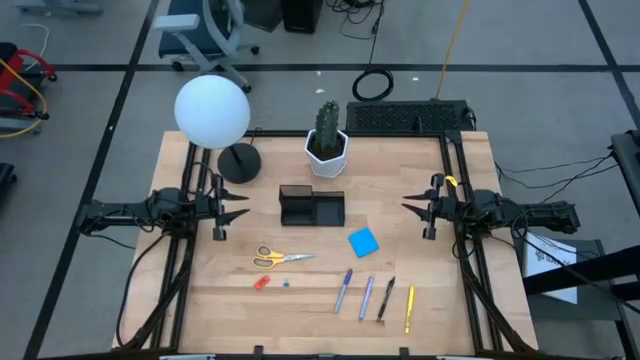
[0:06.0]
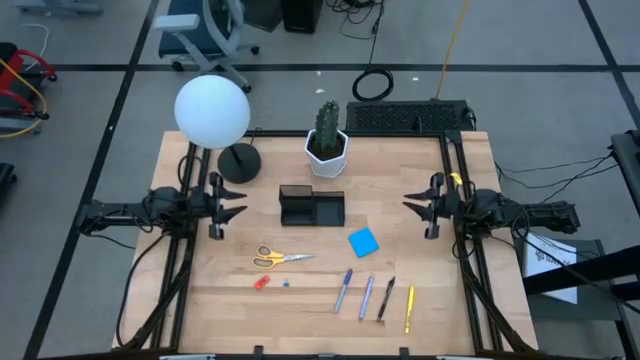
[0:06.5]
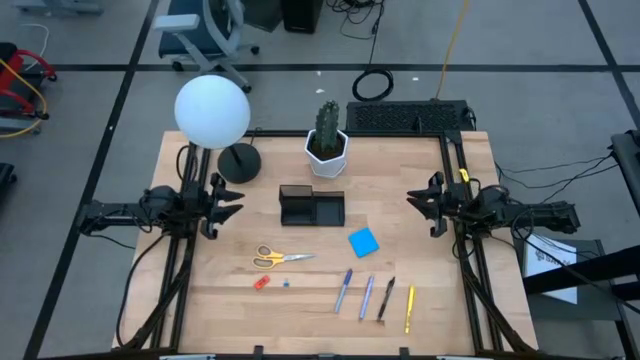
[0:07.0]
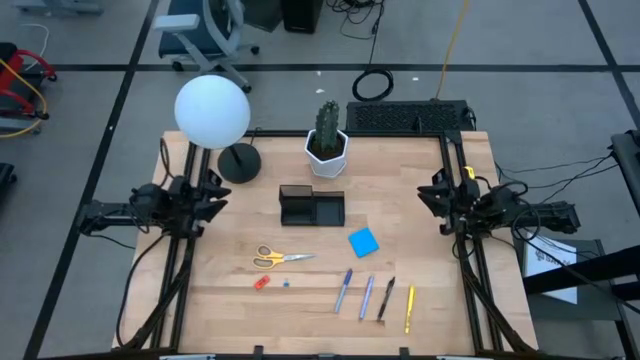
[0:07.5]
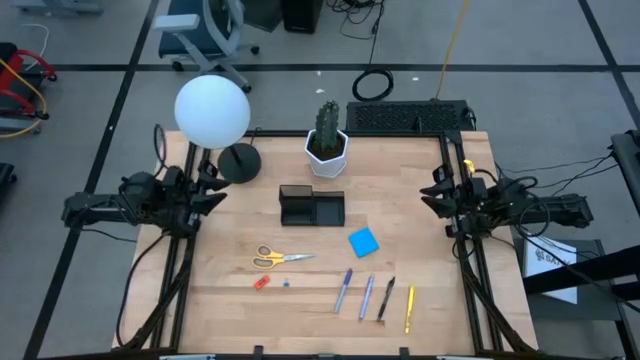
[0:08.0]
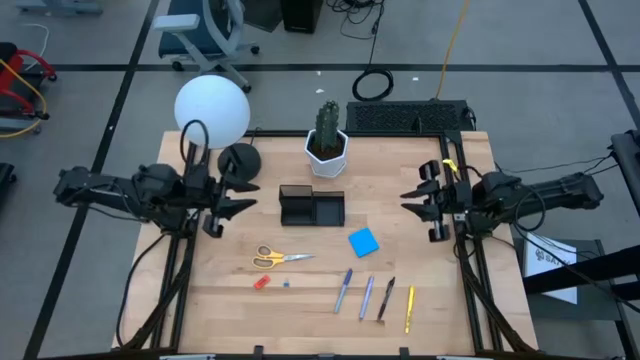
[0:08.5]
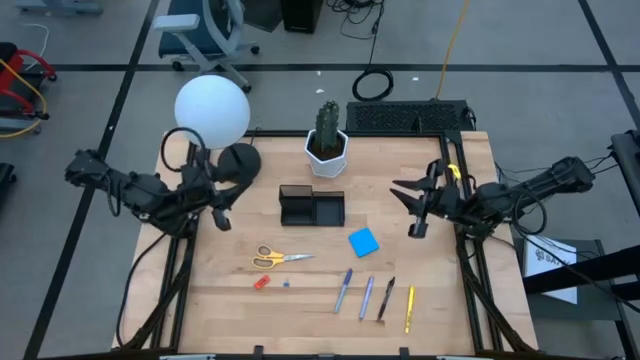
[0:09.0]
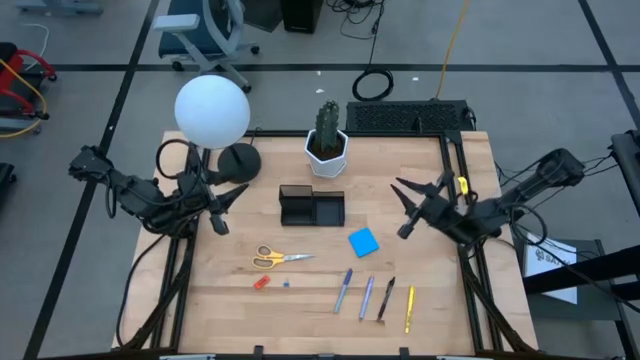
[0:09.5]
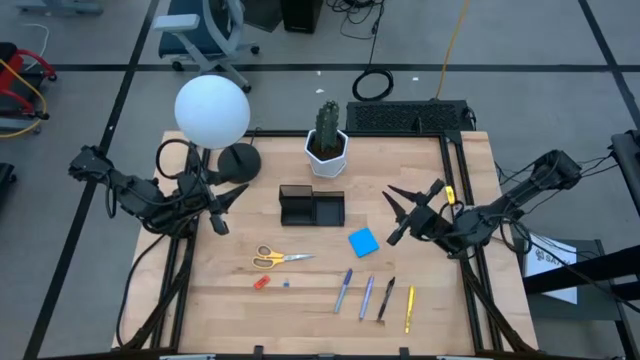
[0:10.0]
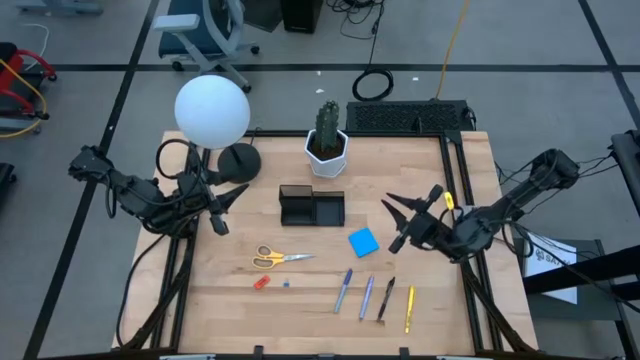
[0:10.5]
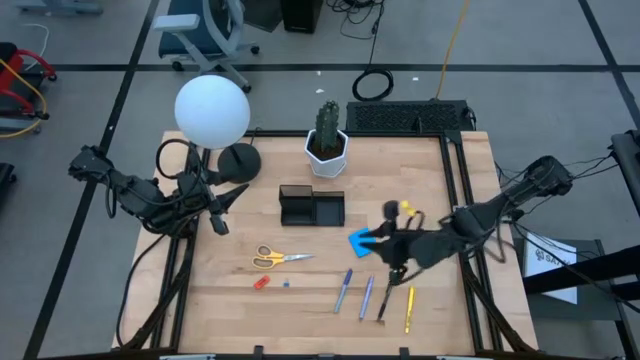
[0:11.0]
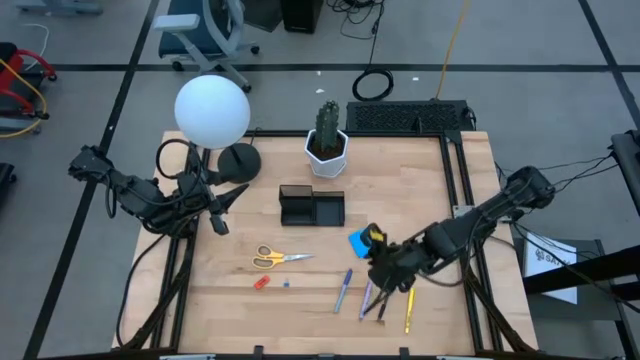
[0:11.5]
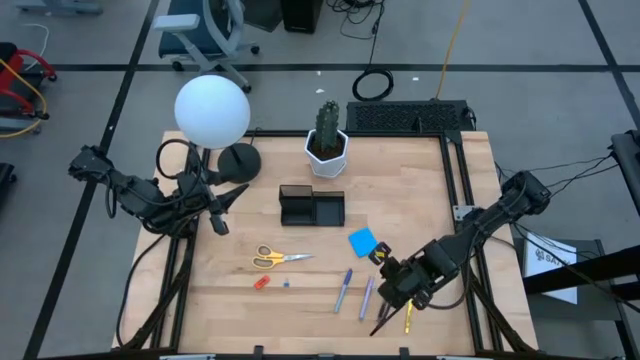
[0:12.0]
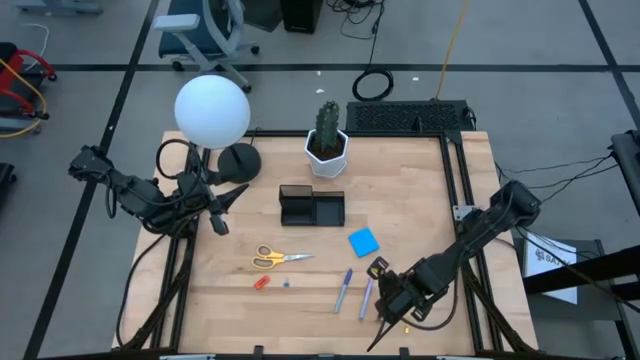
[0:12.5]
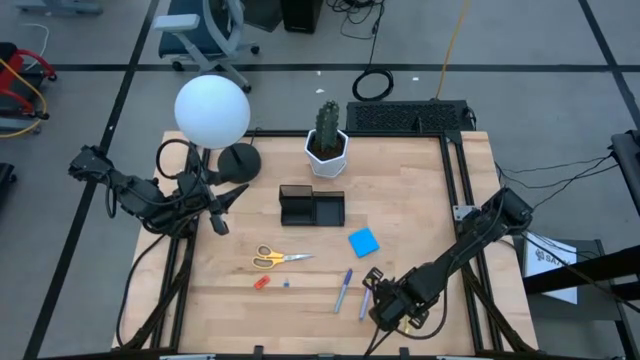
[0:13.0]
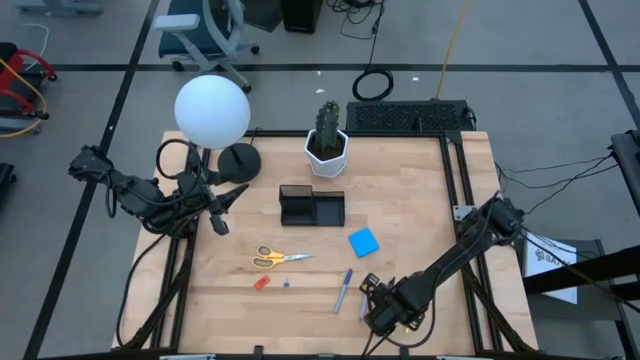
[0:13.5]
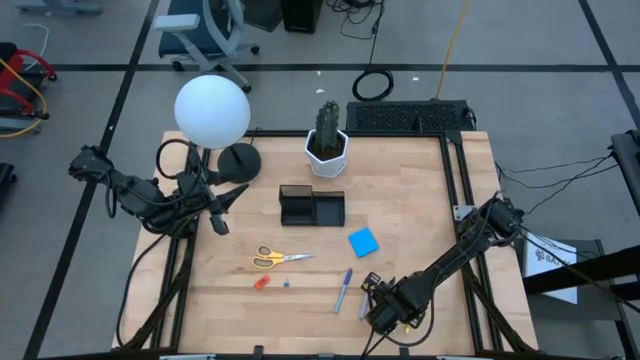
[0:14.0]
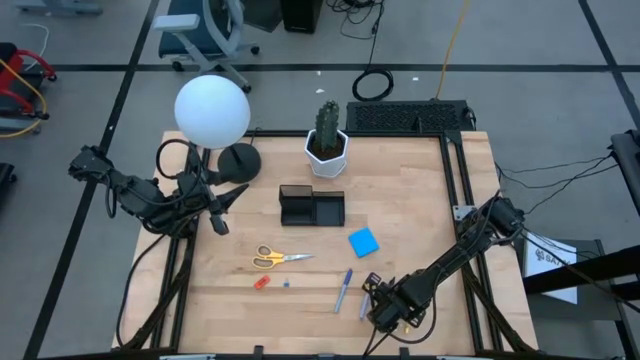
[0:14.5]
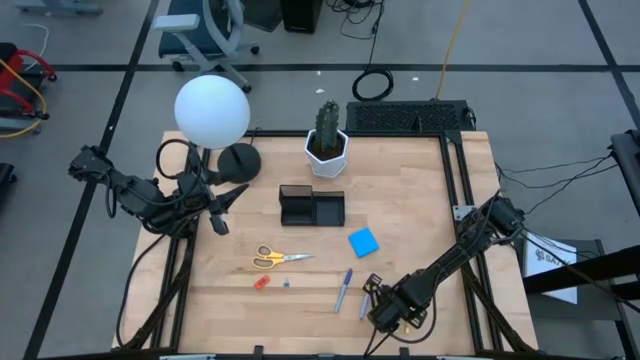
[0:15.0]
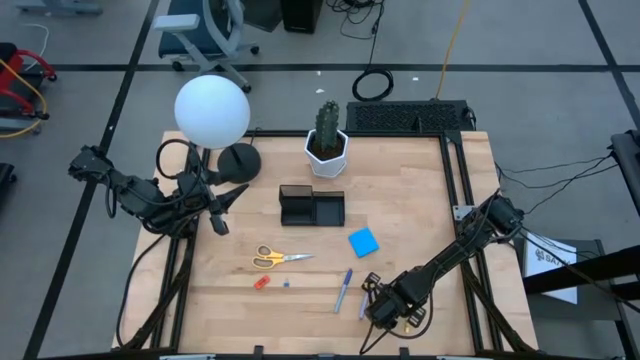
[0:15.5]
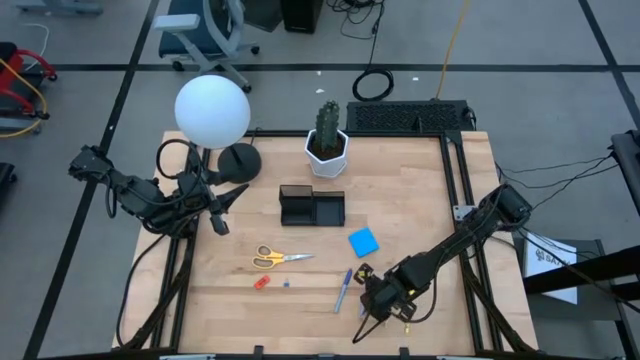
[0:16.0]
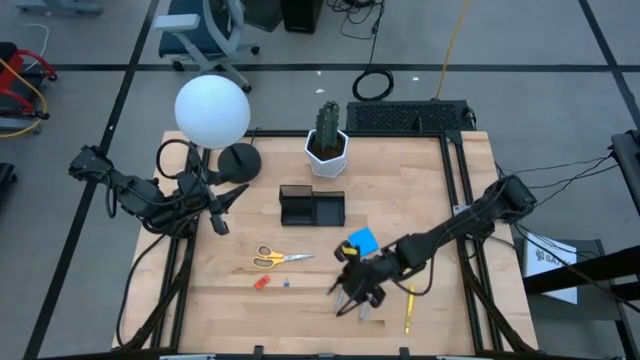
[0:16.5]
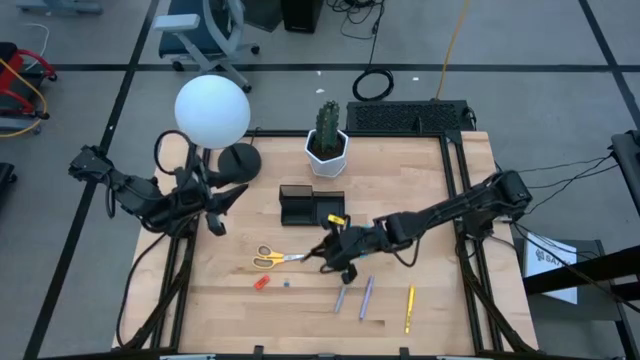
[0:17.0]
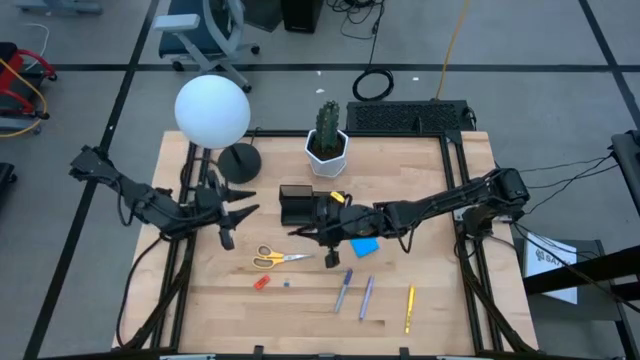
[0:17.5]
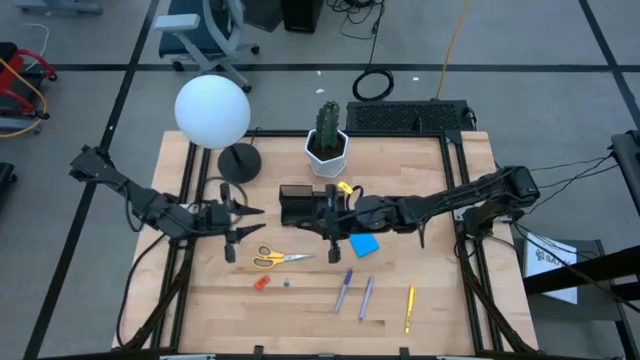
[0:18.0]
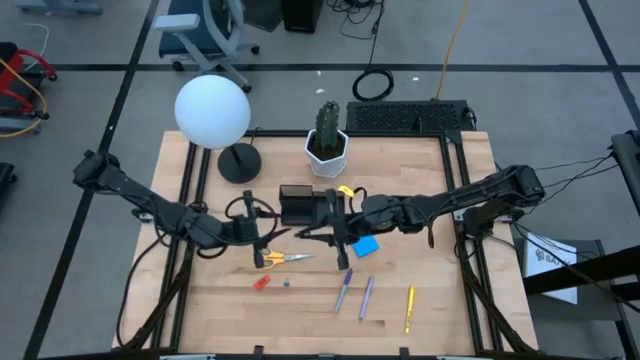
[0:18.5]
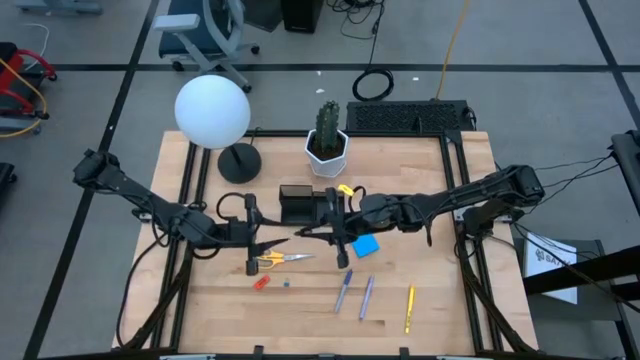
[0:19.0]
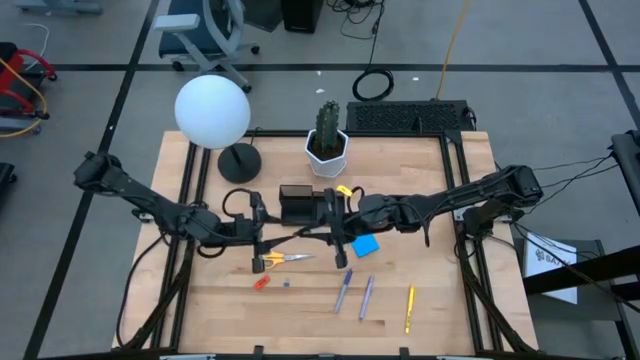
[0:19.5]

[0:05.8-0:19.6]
Task: Pick and place office supplies into organizer
Put the black pen into the desk organizer

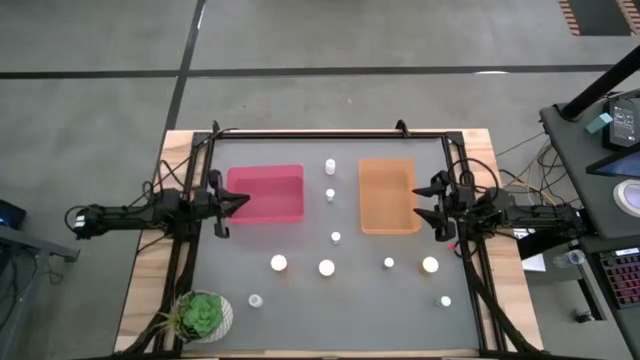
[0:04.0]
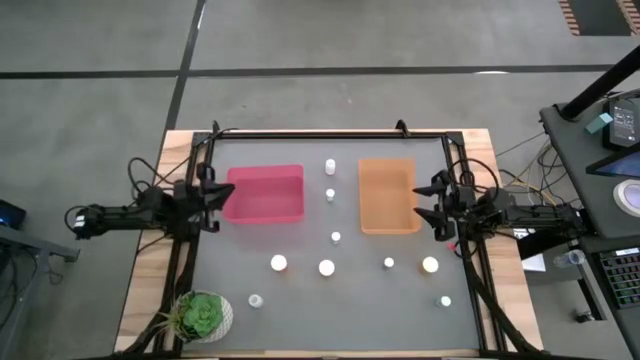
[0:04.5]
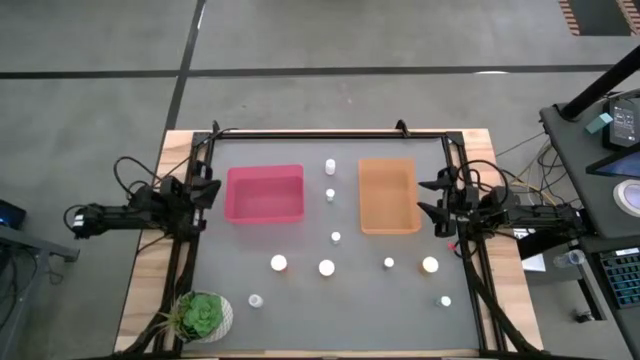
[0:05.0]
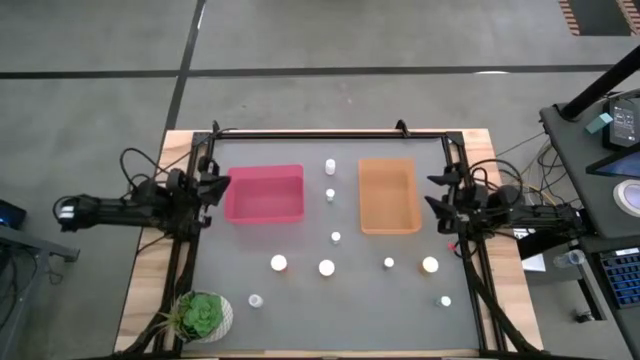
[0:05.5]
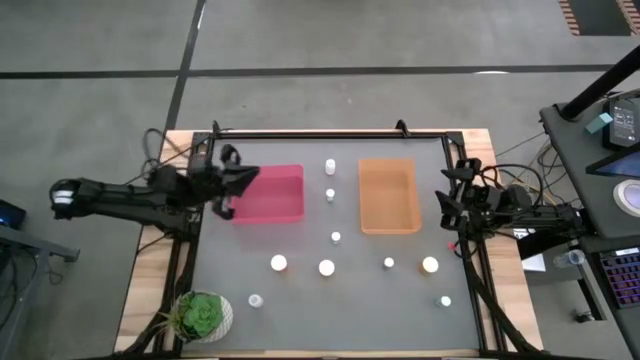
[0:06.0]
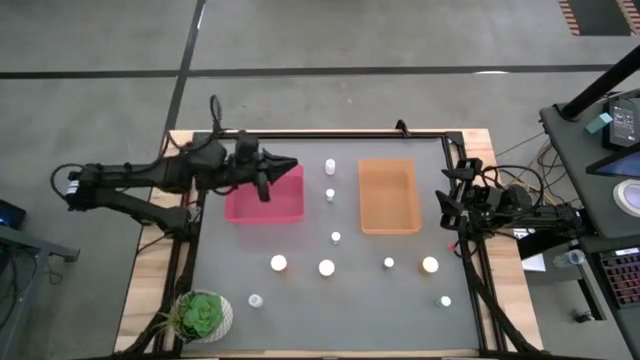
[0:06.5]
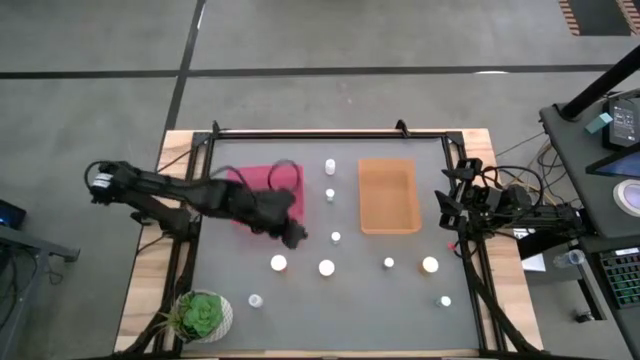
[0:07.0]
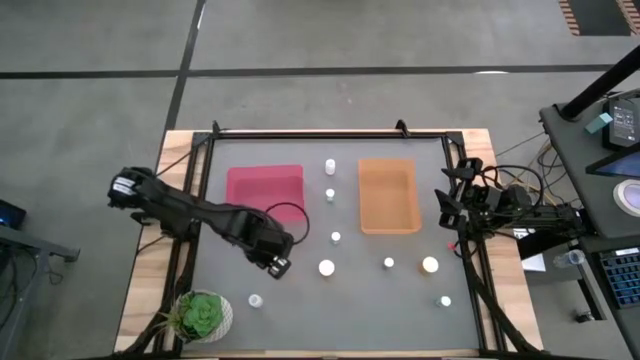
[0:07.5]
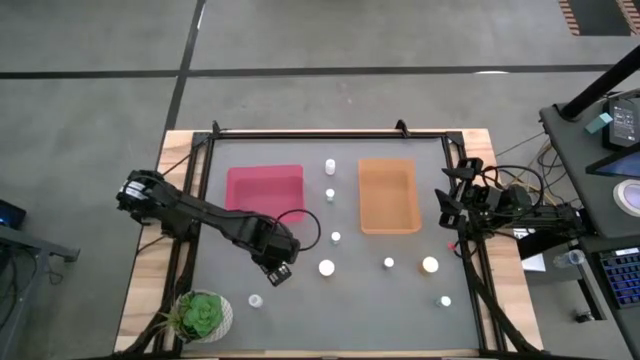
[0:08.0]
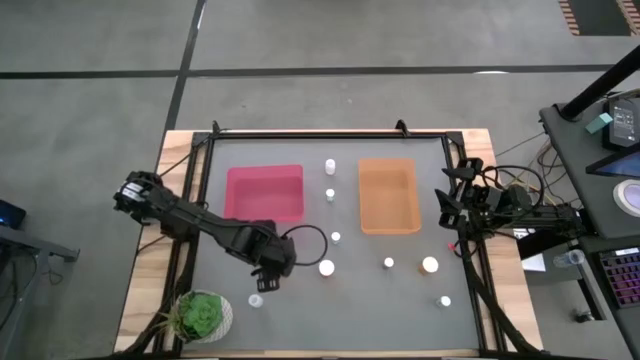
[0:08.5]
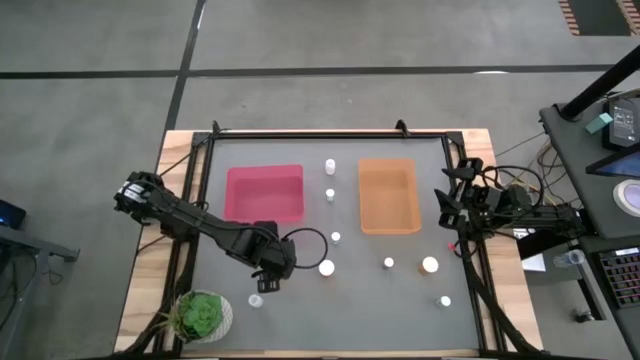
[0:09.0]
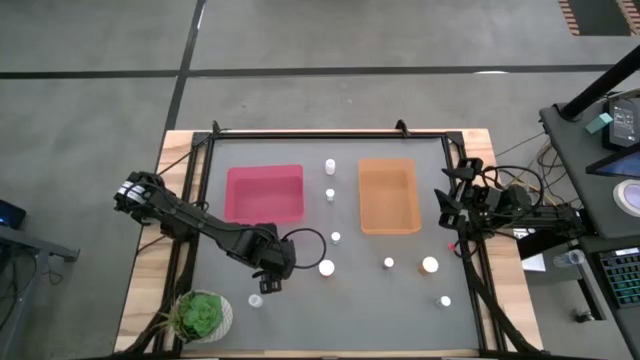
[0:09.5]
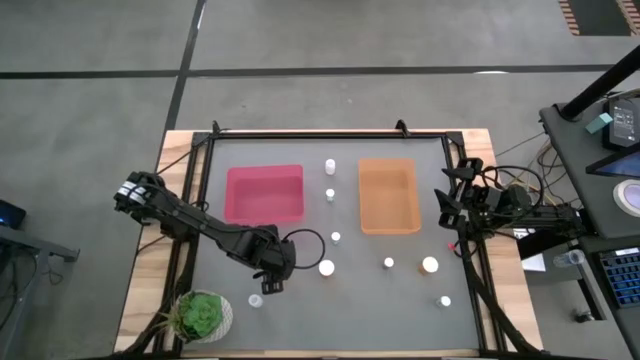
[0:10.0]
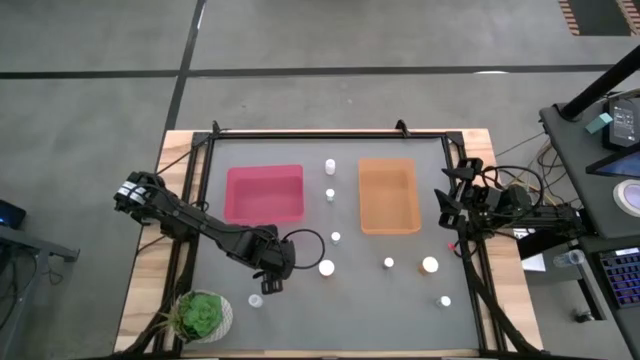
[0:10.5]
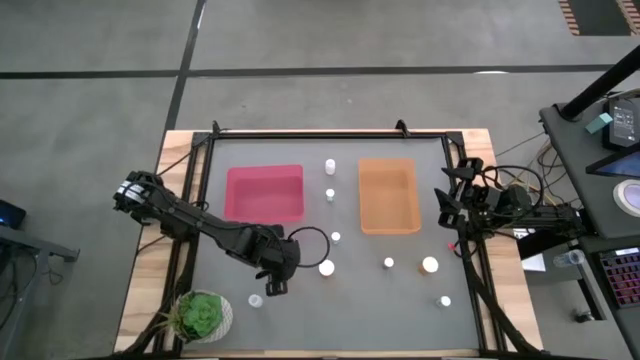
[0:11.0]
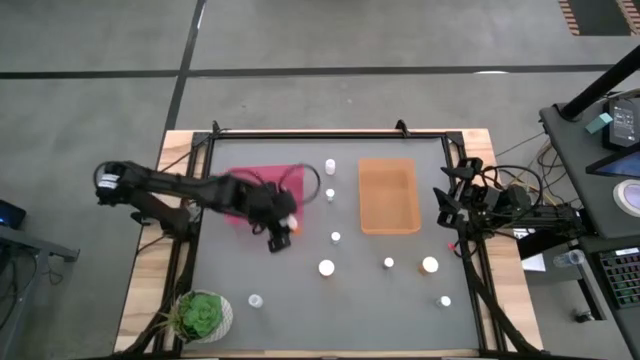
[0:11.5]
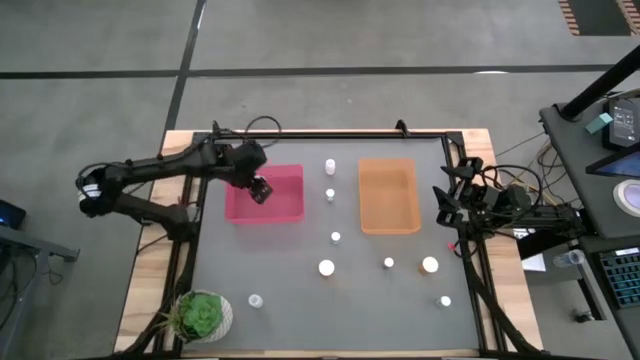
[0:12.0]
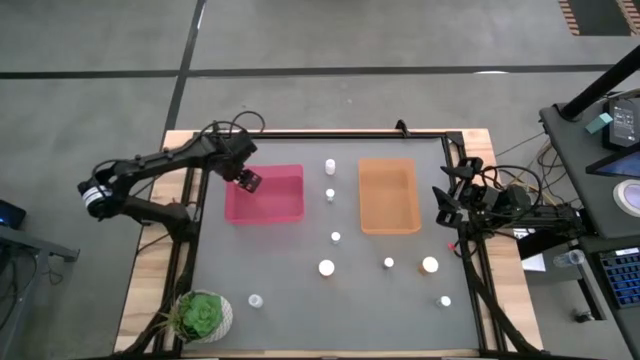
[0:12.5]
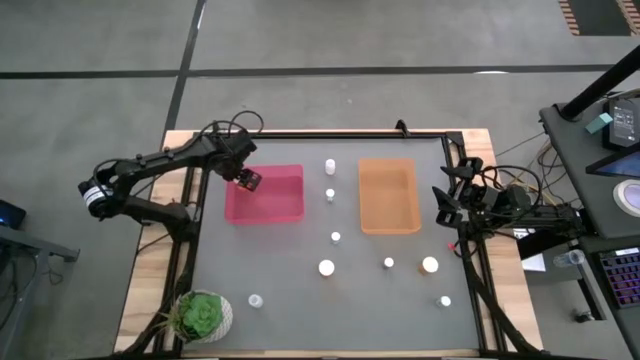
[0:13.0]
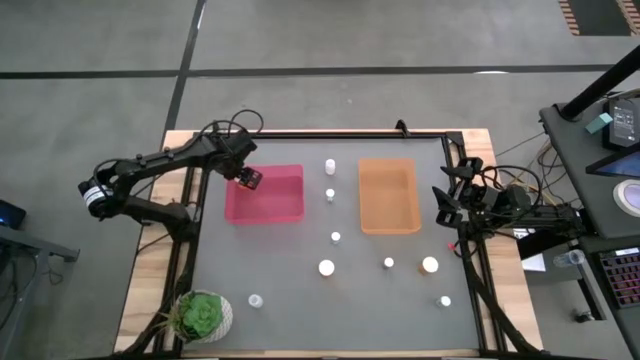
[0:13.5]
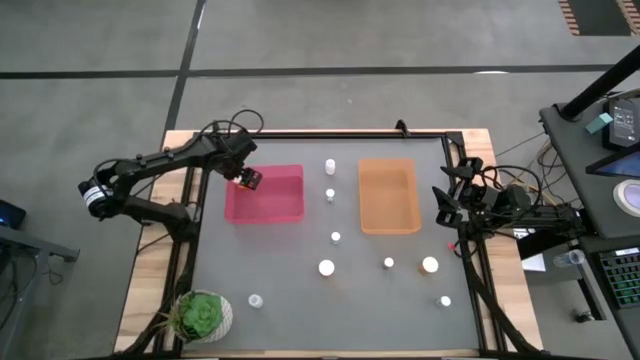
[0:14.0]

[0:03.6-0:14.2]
Task: Pick and place medicine bottles into bin by pill shape (circle, oval)
Put the left orange pill into the pink bin
